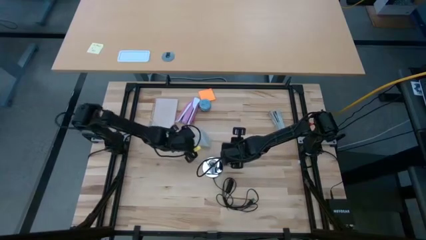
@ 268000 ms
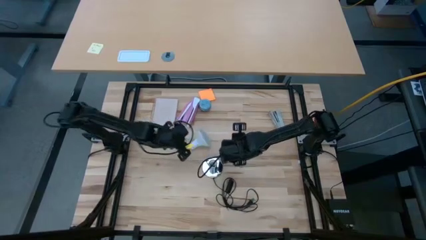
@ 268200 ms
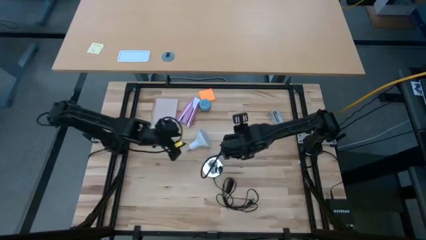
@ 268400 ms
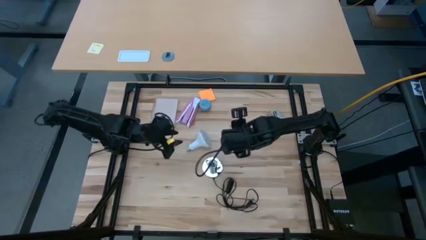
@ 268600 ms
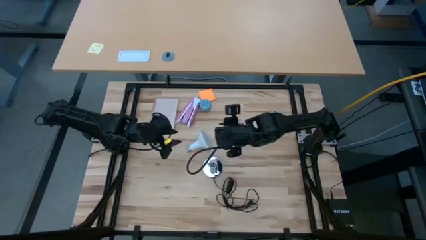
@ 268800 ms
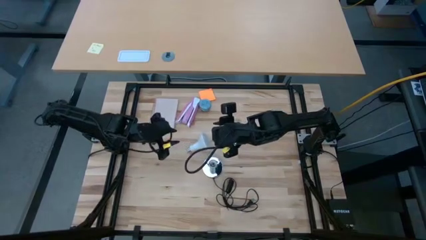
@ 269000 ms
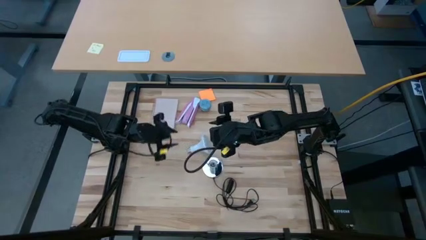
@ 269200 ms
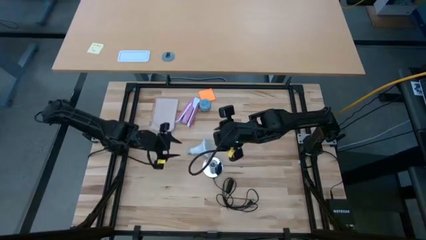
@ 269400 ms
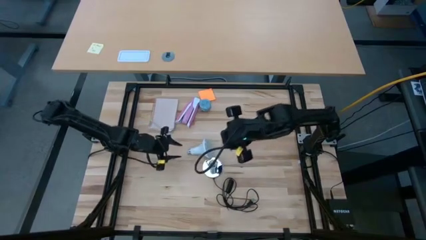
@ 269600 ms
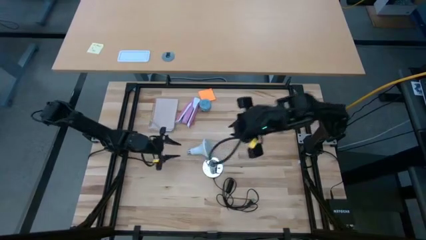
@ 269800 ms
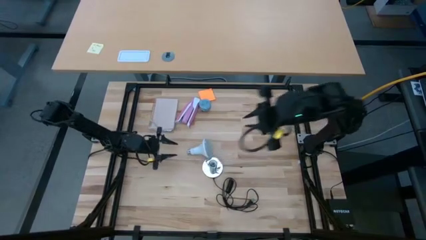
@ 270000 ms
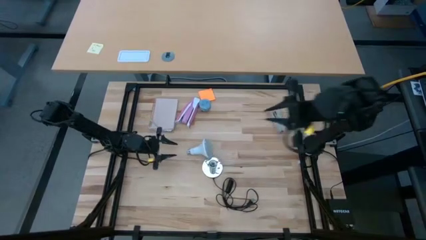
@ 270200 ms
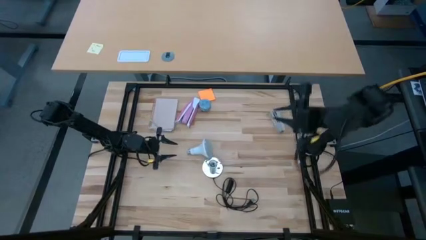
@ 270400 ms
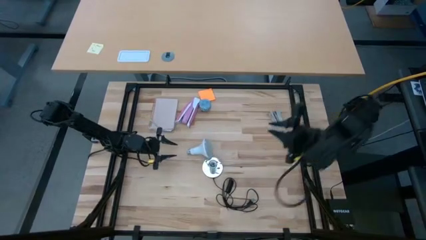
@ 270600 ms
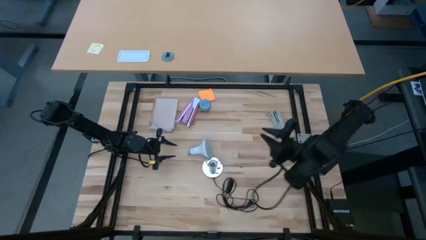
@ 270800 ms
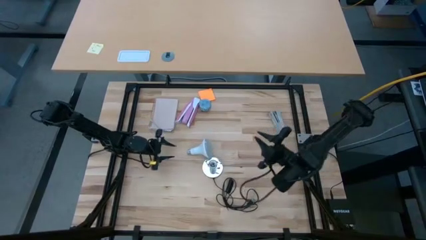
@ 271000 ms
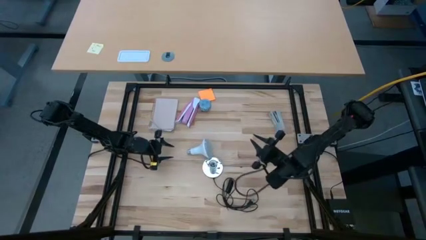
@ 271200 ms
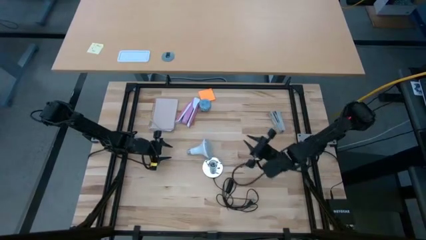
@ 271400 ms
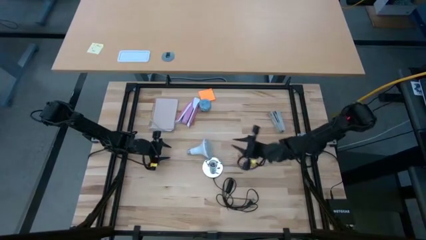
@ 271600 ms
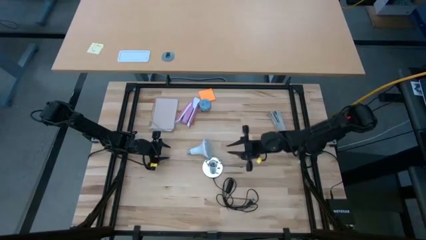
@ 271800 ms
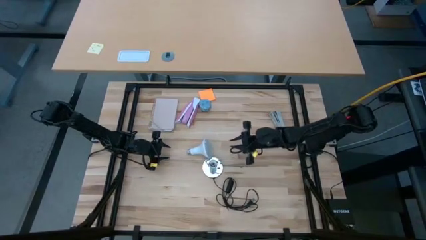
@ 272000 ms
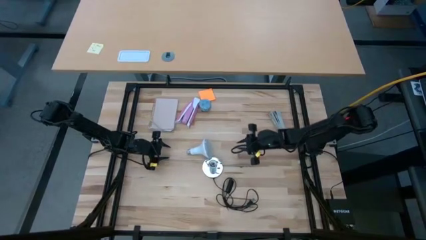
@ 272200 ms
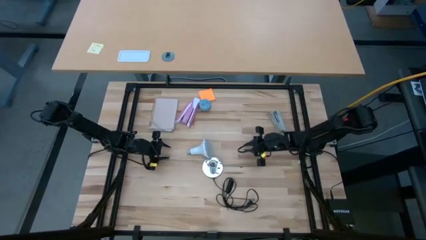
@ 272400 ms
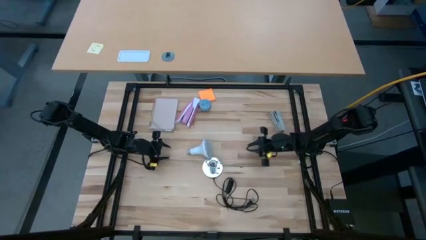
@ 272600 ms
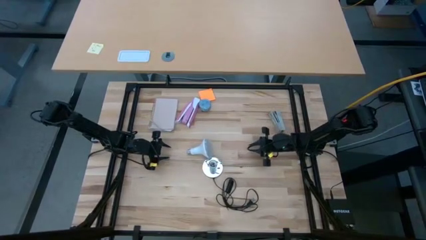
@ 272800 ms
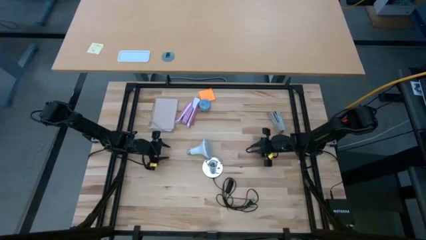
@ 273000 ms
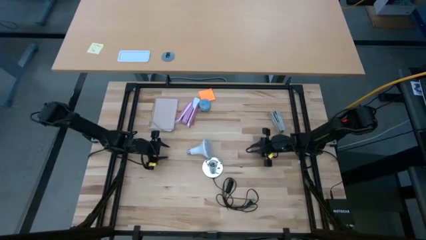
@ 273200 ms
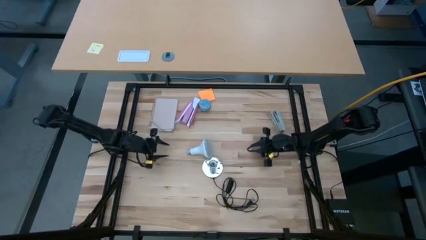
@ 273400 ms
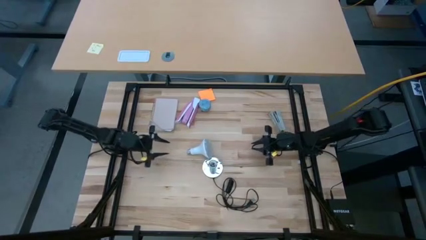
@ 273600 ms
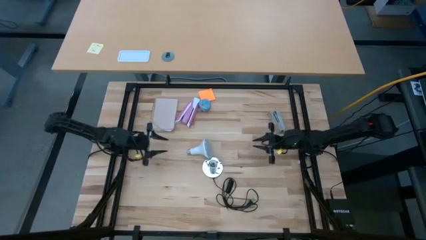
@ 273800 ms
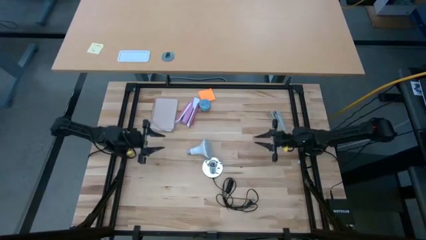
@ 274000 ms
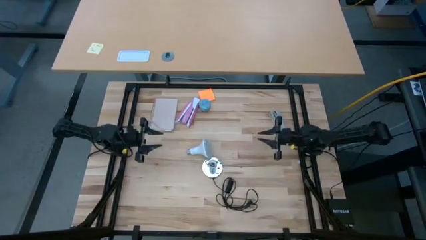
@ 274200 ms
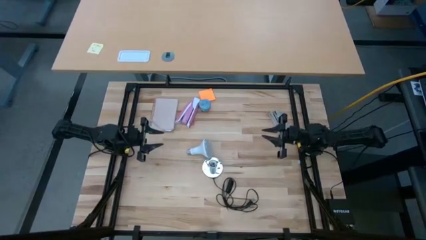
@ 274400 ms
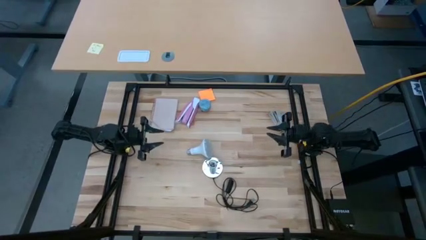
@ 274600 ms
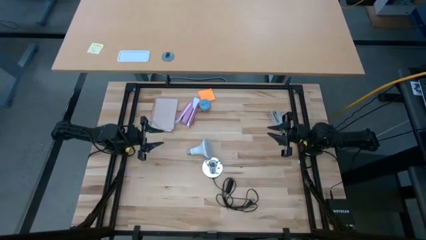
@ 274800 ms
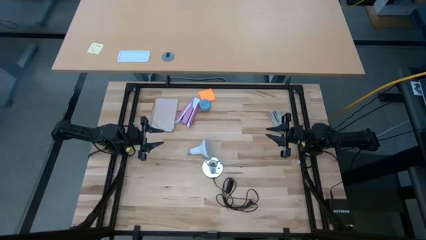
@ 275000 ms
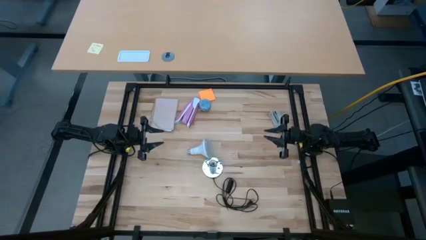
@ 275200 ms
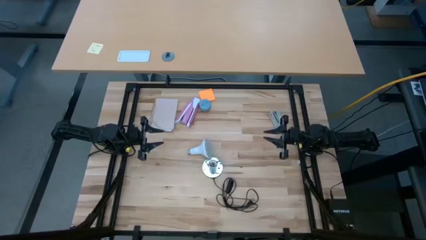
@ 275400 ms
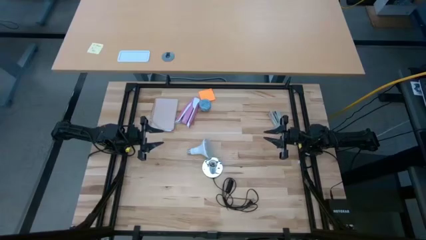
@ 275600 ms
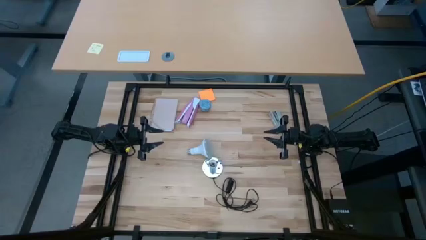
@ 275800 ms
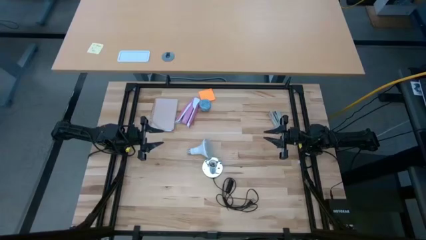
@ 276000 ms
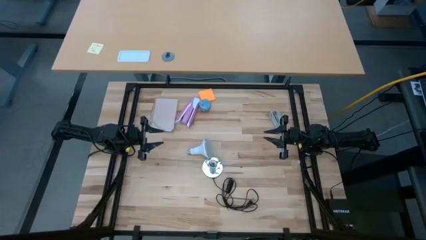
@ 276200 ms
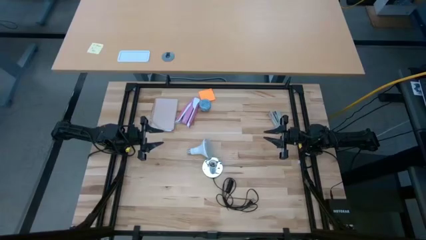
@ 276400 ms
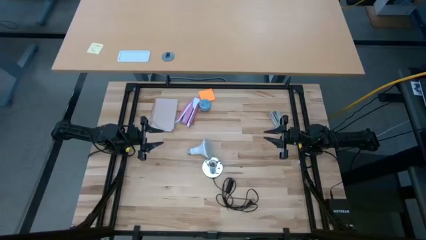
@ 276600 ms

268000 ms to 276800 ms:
Task: Screw lightbulb
Return to Home Position

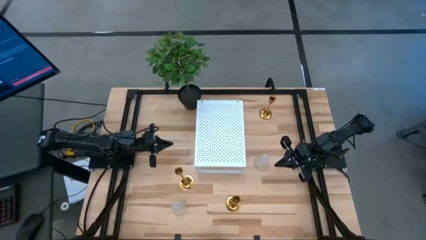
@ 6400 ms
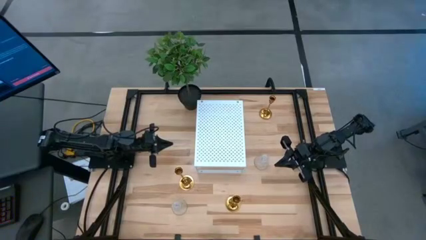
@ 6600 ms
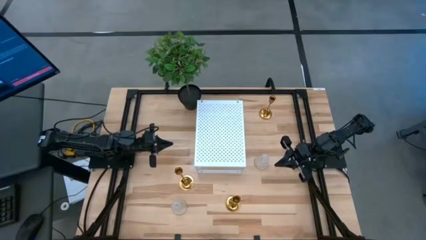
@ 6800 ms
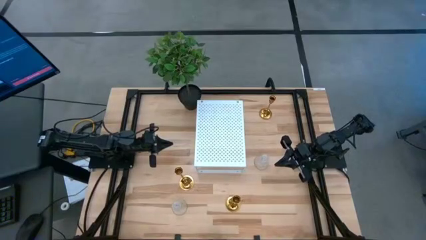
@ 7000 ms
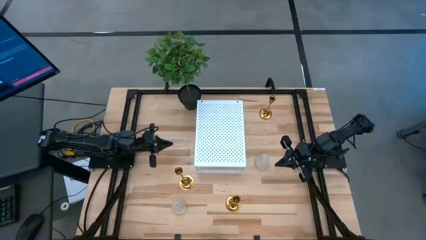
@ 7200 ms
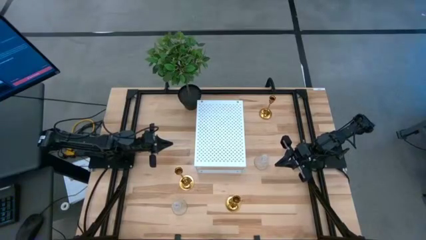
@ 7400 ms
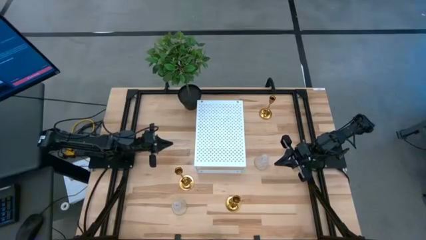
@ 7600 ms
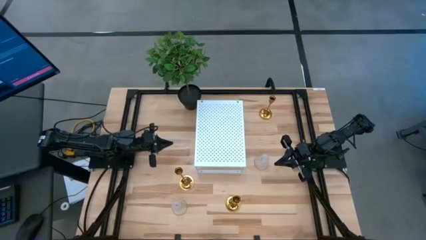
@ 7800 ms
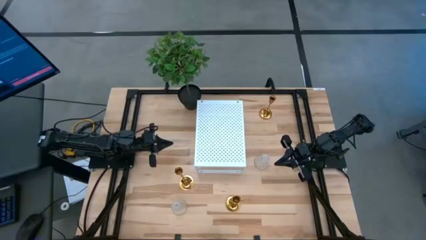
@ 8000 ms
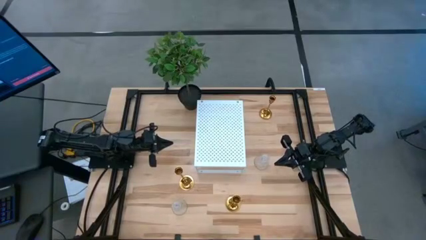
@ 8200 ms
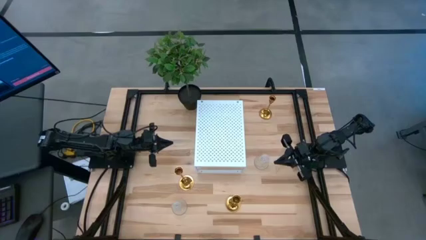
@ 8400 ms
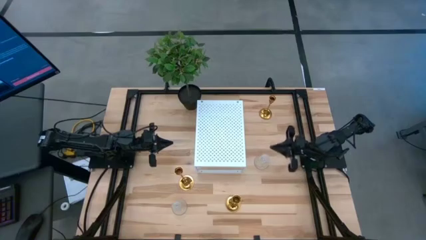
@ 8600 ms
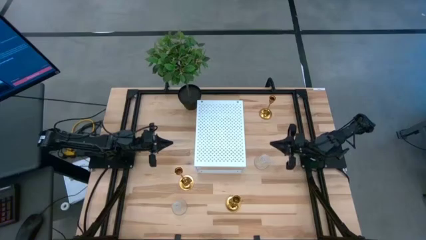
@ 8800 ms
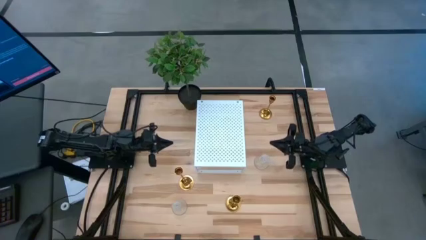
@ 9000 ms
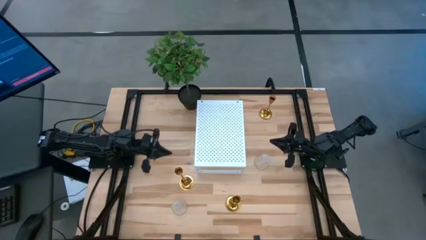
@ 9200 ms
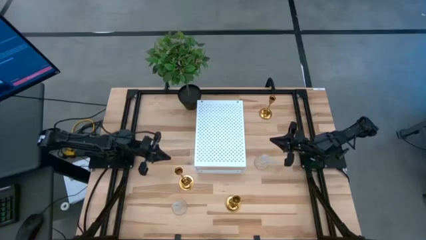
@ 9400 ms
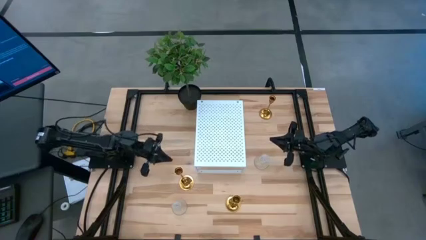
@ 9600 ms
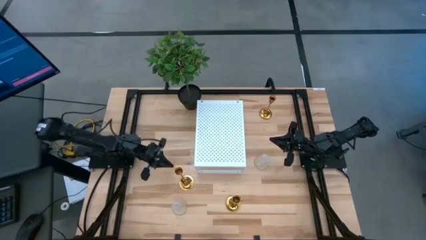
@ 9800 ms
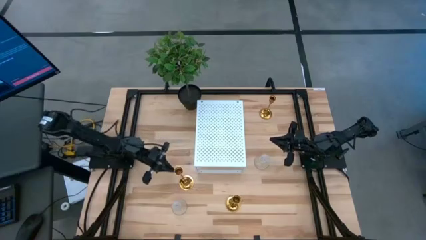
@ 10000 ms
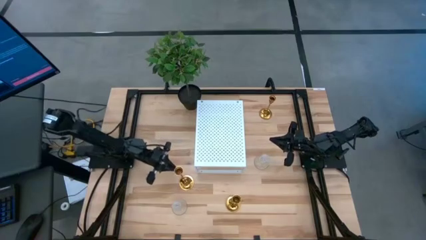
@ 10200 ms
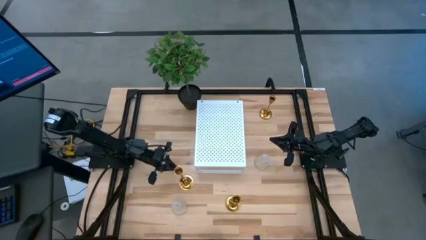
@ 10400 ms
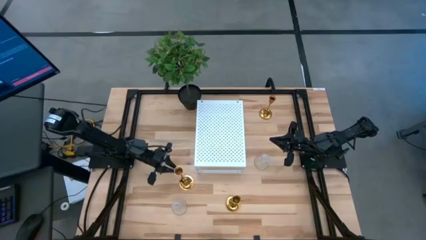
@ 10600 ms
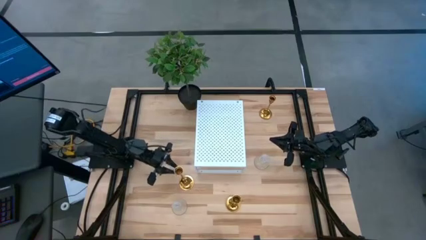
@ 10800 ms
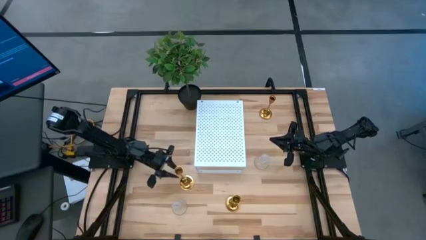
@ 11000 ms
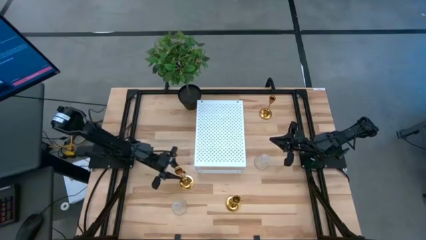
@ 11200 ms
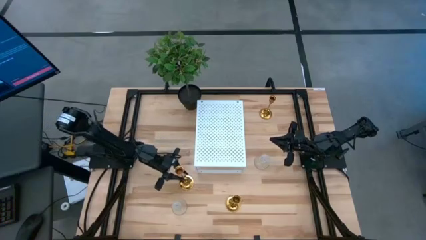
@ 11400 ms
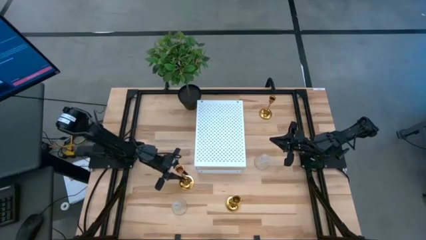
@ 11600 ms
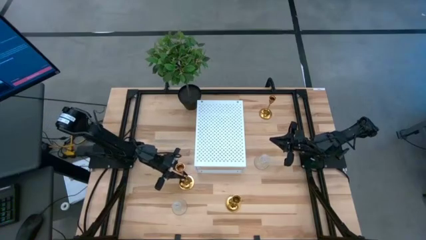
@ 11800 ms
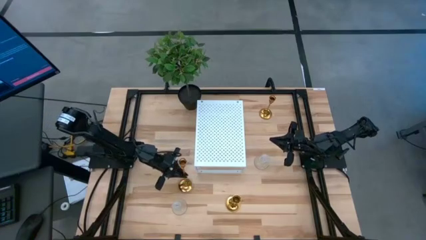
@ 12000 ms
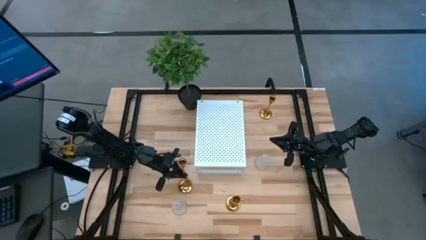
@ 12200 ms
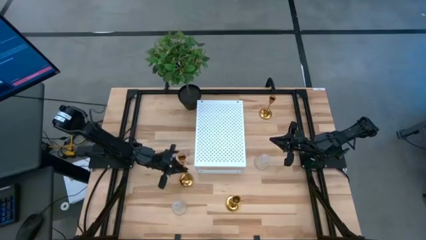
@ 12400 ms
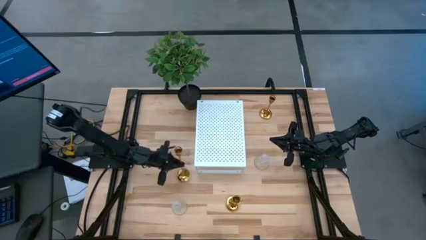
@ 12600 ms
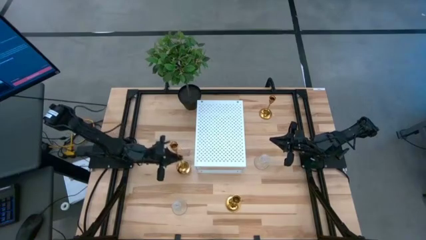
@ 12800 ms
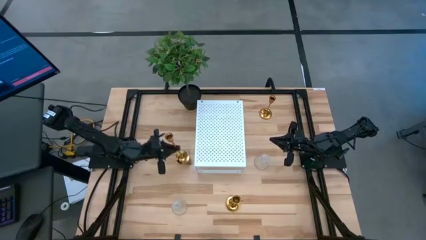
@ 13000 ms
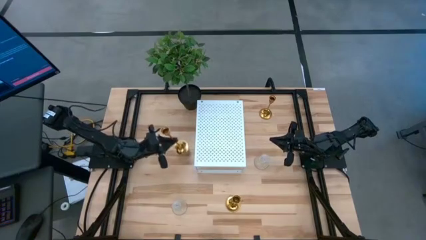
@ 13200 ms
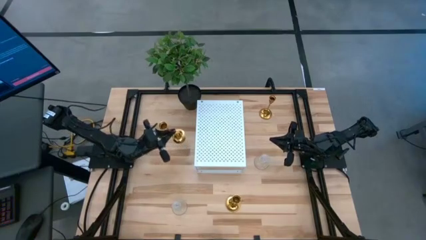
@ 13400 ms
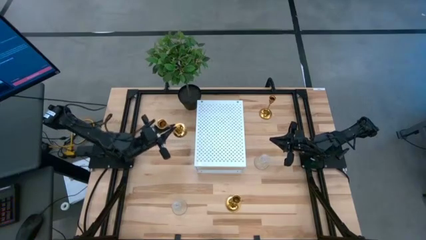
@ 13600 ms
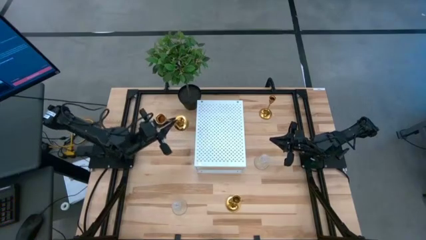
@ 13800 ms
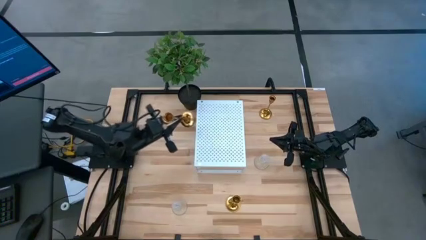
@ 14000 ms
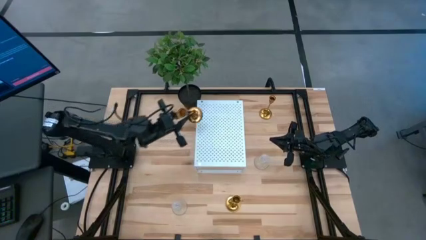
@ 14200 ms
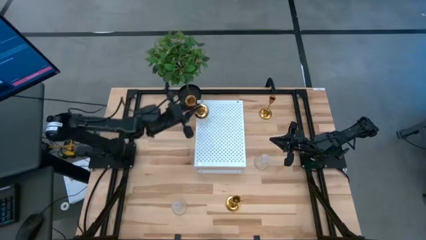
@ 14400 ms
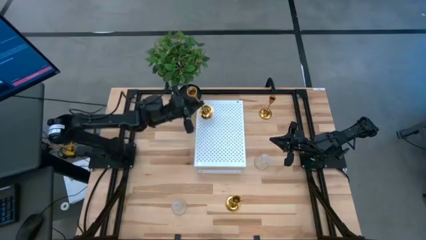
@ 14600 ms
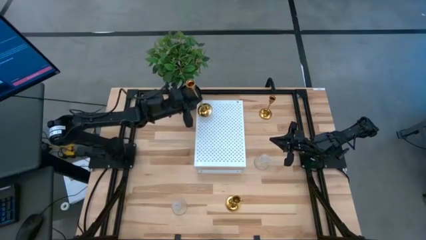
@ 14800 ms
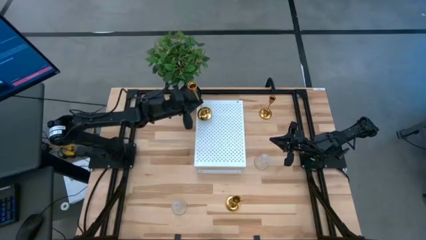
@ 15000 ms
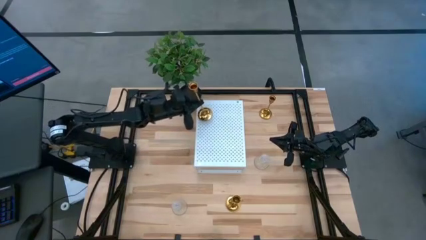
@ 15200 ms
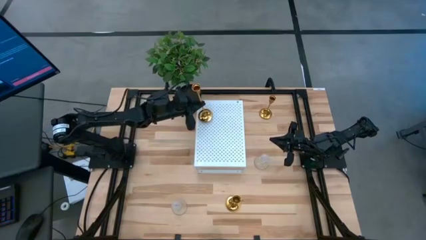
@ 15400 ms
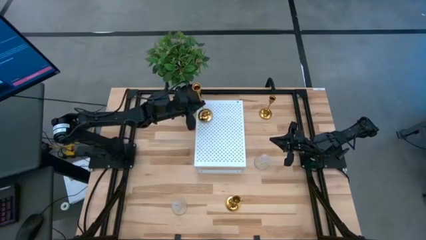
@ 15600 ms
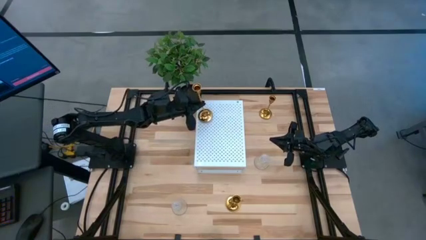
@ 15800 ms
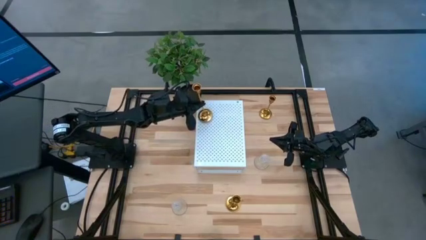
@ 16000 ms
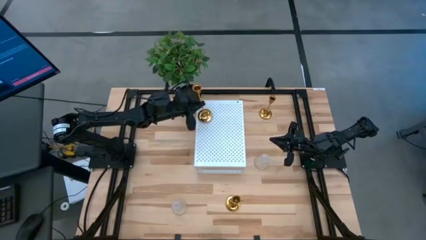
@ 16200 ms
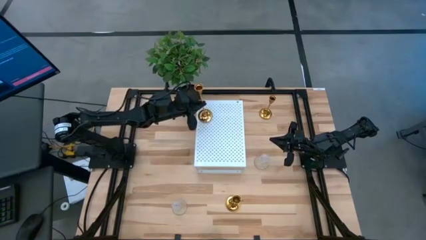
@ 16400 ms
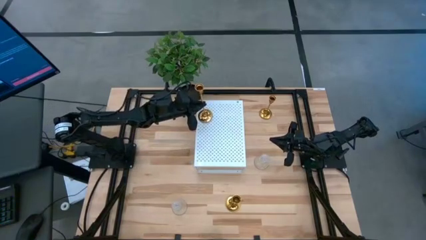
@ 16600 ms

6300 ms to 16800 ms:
Task: Pick & Place candle stick holders
Put the middle left gold candle holder on the shelf
